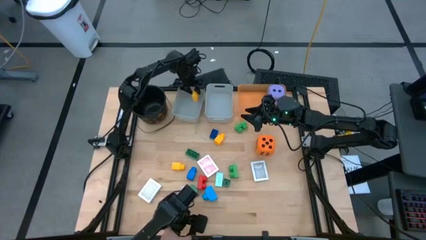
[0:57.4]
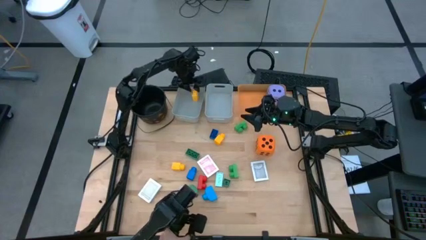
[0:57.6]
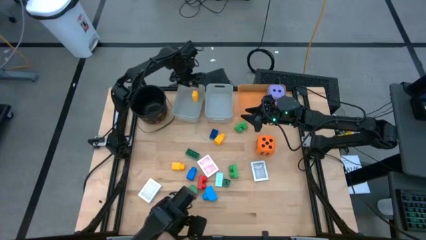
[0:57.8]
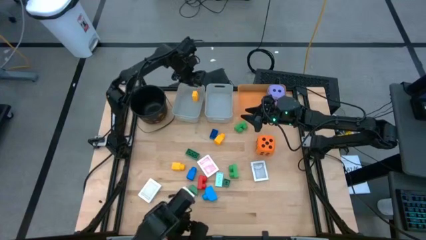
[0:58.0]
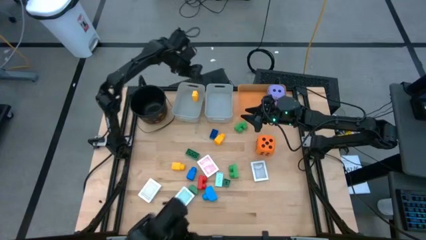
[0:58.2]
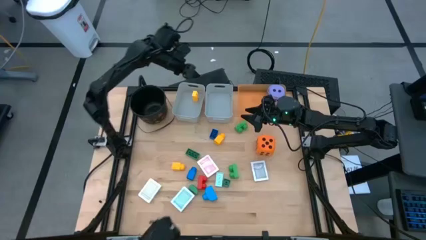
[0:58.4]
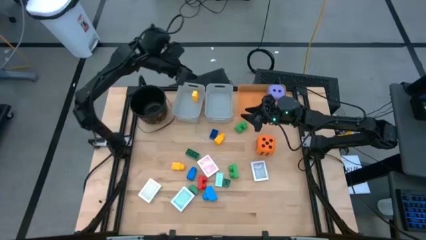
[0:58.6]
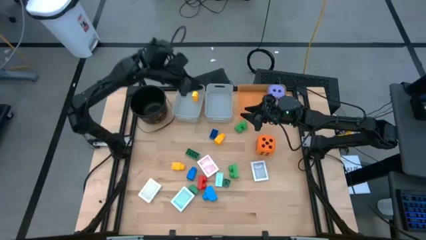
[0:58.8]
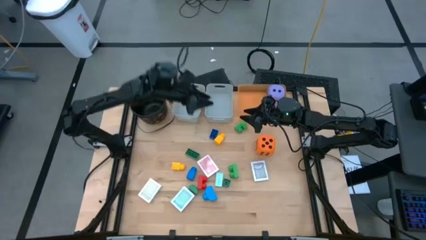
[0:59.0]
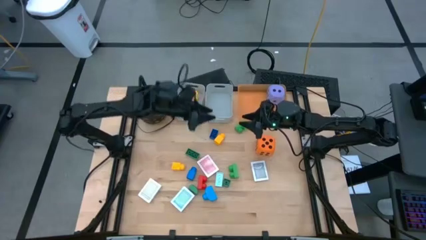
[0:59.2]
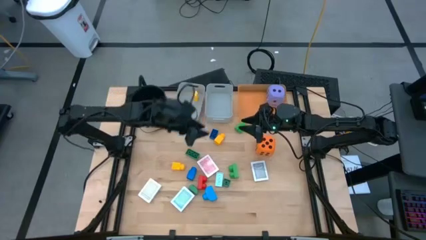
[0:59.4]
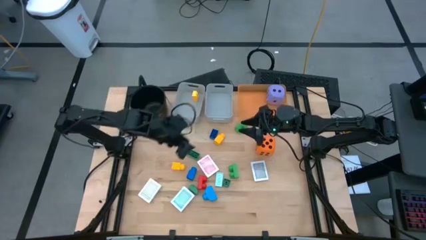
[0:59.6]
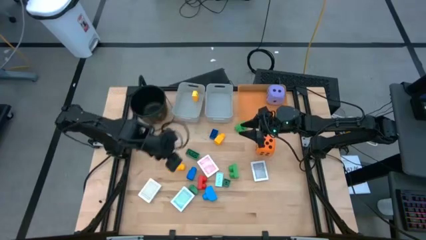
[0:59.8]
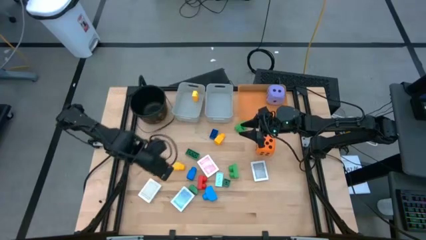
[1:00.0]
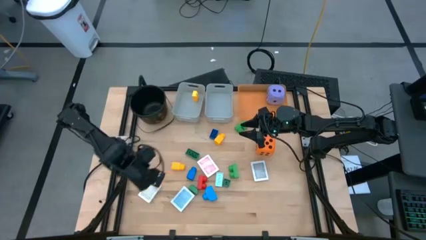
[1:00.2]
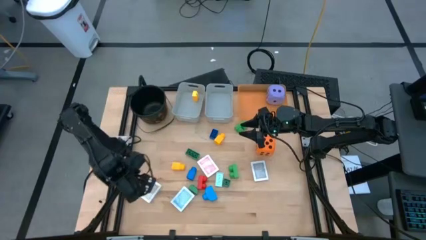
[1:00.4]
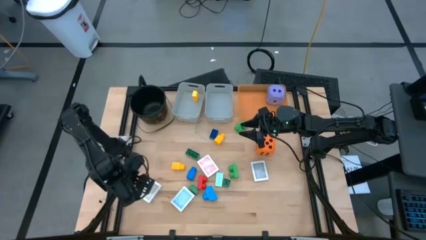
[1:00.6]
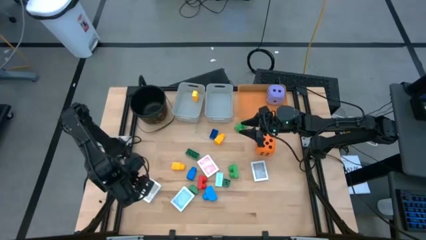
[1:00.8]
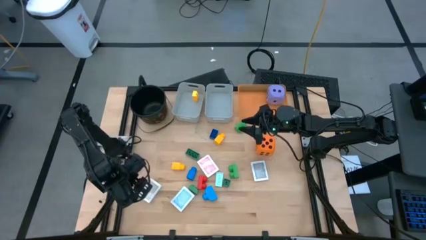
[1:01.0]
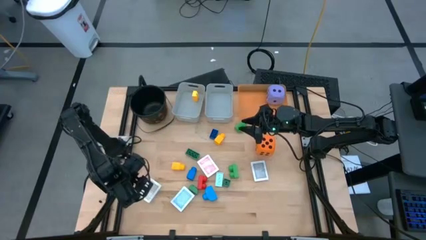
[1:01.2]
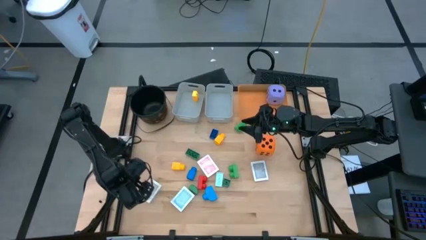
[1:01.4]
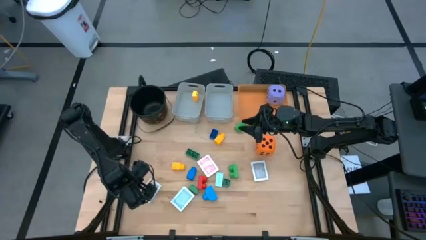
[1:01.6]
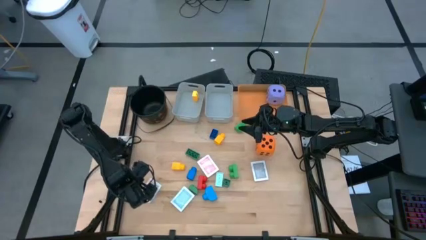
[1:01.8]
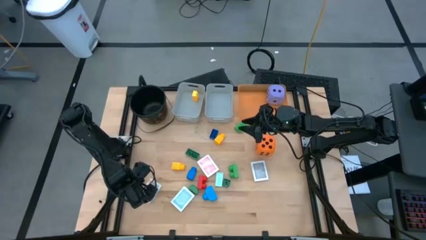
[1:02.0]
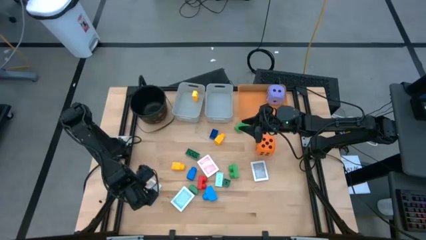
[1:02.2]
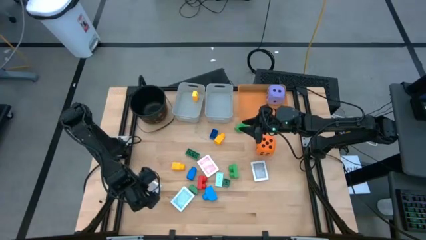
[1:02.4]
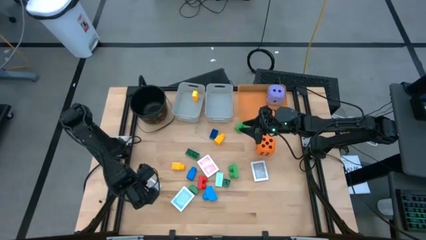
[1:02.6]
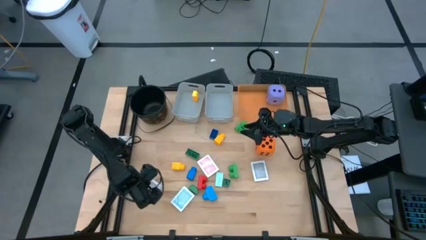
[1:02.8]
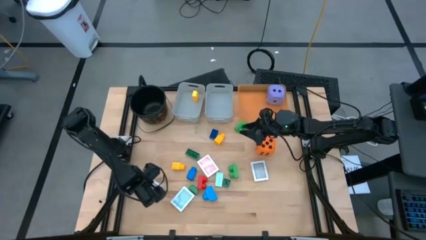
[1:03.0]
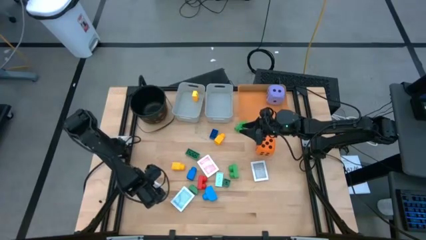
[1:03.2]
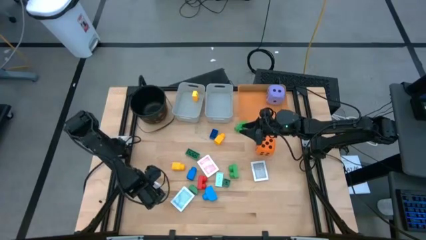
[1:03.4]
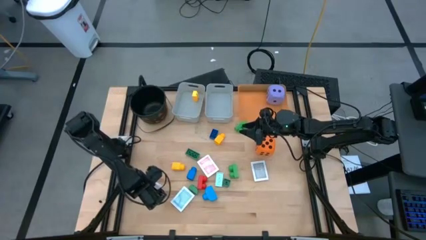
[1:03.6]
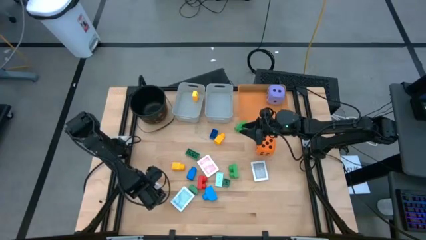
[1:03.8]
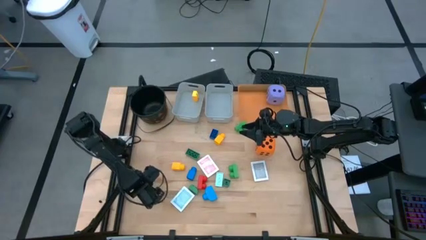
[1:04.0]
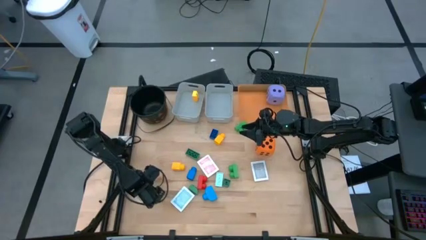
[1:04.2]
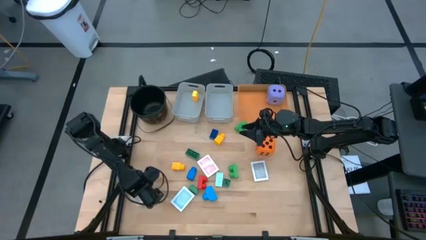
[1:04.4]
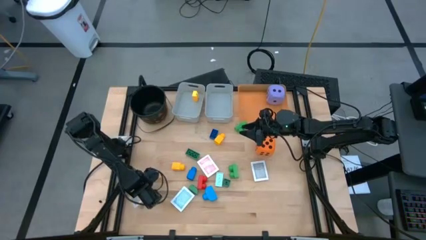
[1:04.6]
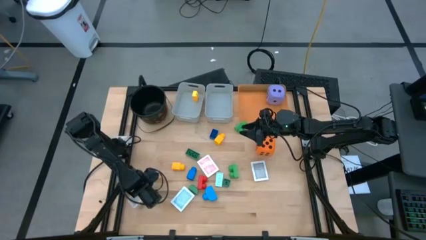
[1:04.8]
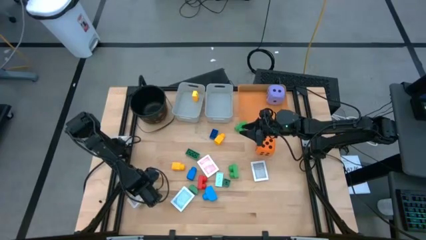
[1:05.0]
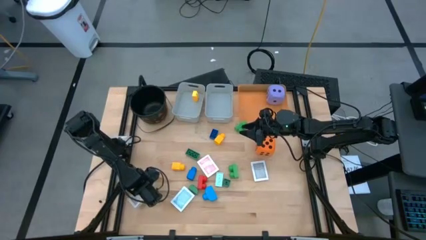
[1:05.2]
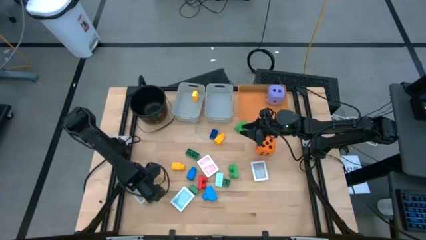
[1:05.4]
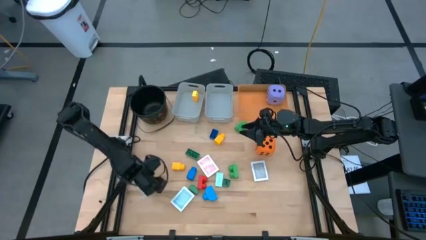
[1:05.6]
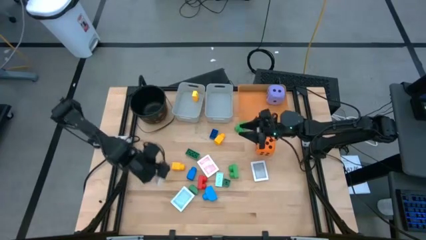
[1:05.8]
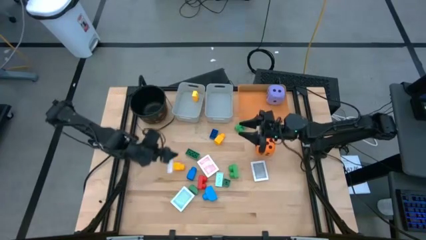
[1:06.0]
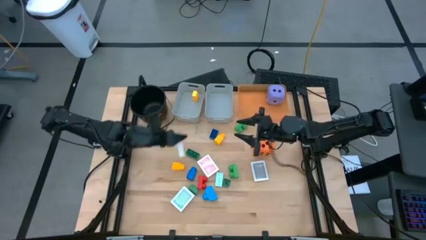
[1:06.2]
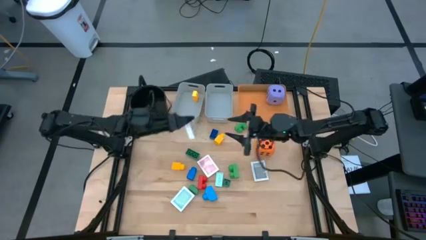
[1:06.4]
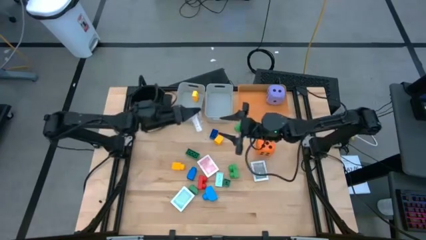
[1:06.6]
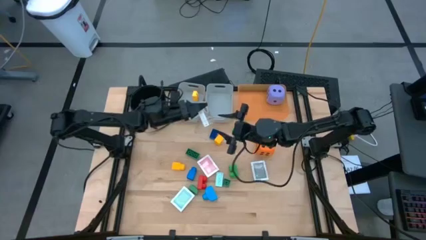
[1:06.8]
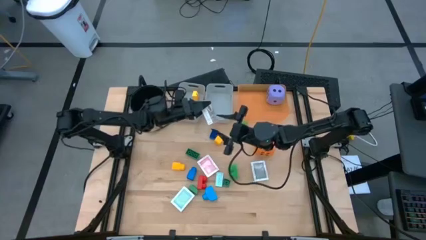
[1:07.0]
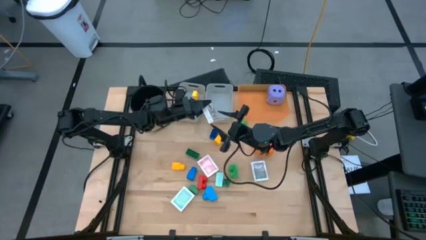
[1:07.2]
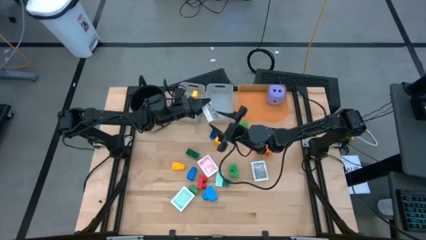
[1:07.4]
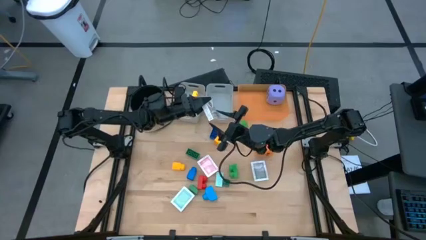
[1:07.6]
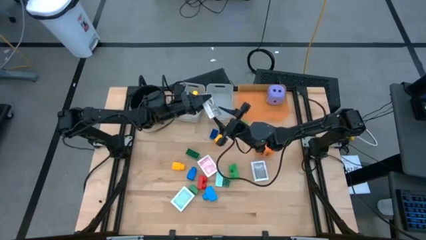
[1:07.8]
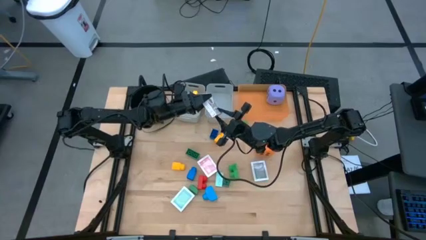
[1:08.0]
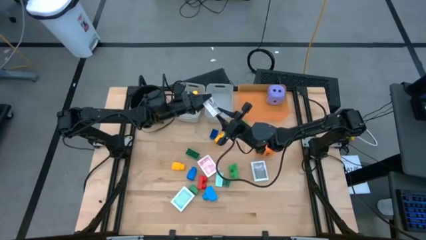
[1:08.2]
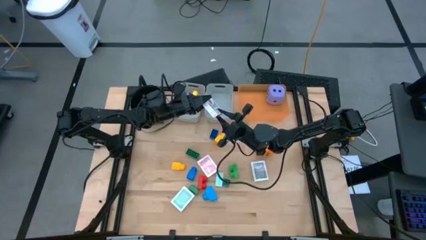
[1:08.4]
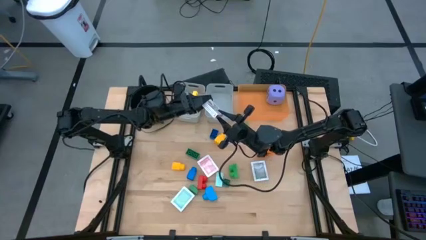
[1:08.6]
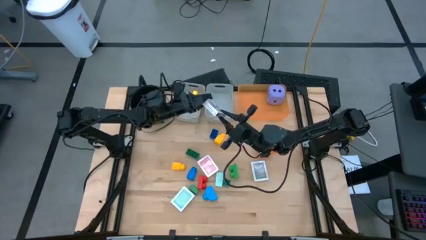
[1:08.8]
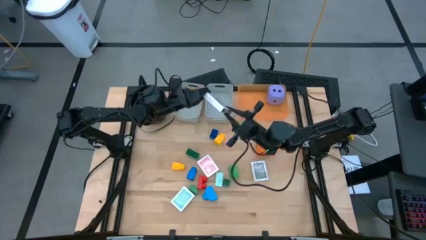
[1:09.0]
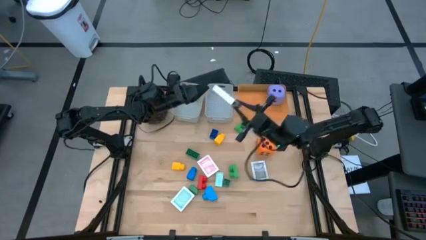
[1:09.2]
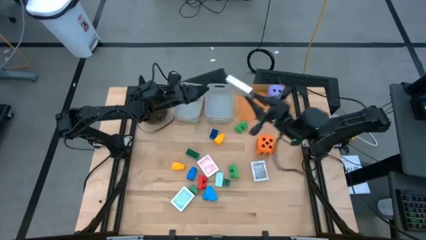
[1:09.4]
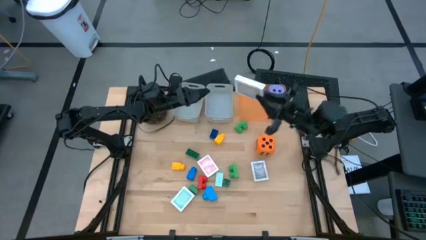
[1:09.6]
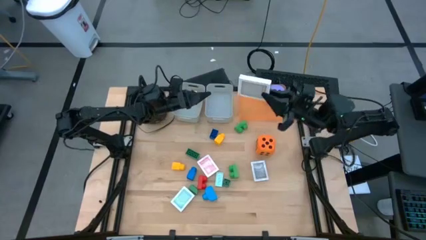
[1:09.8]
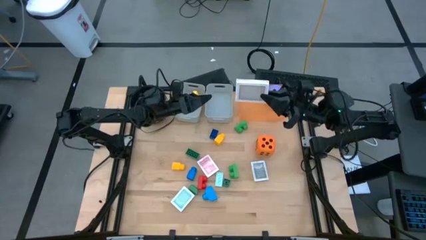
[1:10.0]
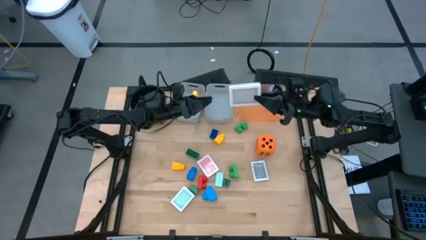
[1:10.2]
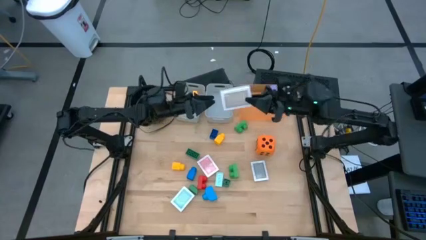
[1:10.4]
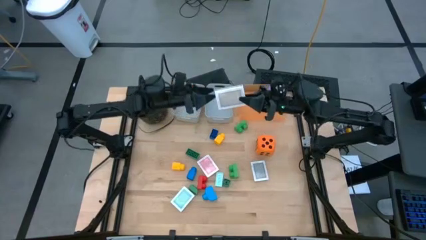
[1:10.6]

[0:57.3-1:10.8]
Task: Pick & Place Toys
Put the brown deck of cards into the right gray bin
